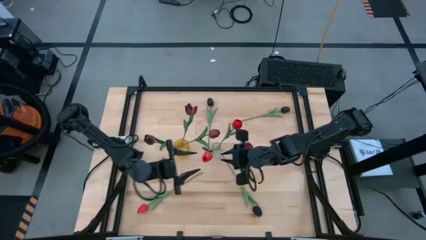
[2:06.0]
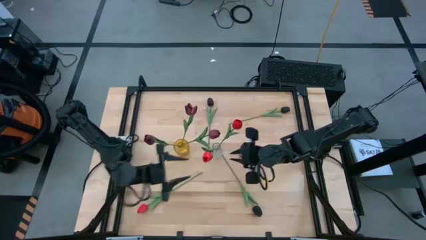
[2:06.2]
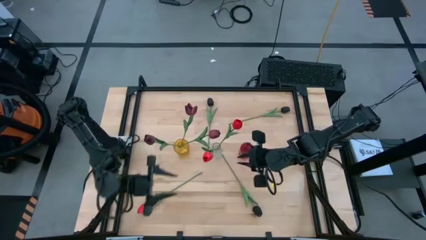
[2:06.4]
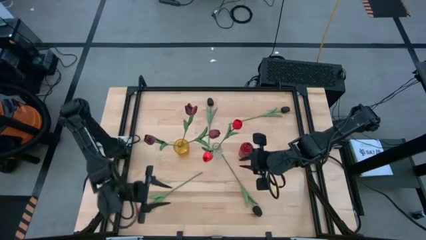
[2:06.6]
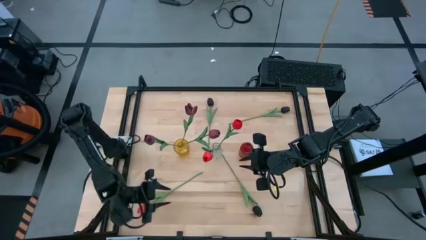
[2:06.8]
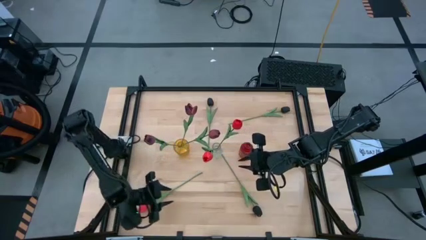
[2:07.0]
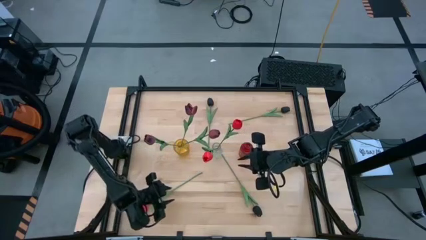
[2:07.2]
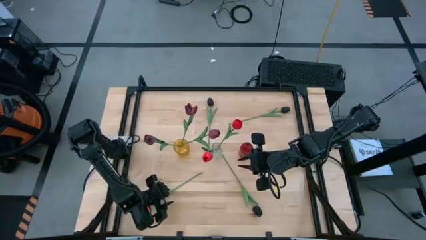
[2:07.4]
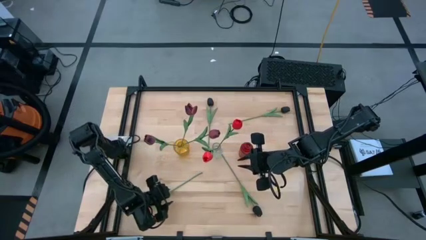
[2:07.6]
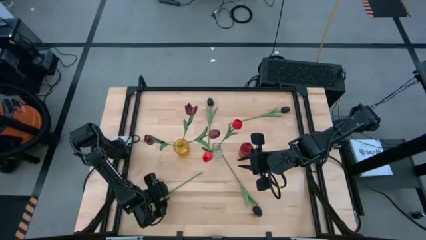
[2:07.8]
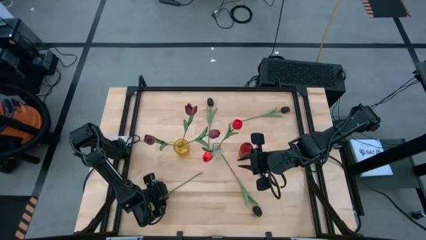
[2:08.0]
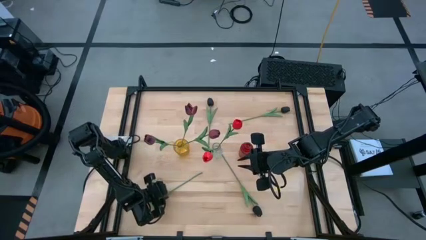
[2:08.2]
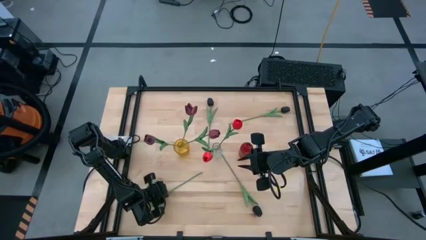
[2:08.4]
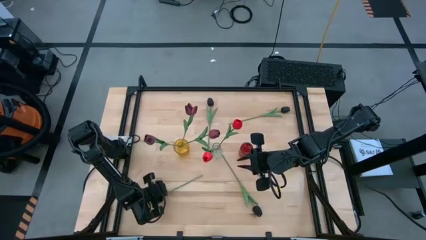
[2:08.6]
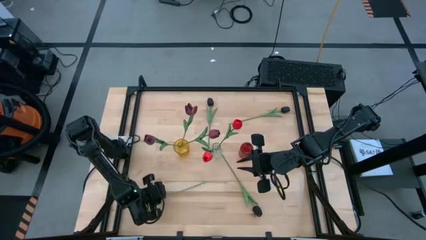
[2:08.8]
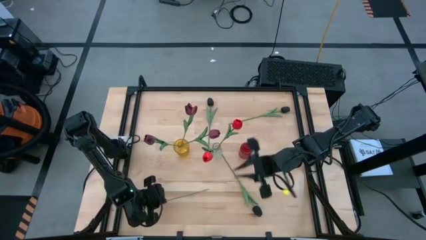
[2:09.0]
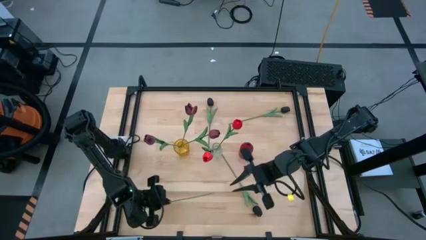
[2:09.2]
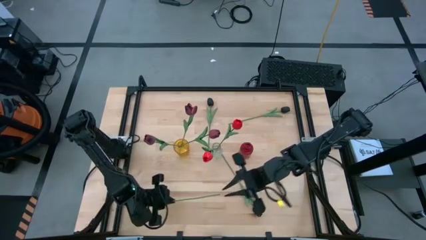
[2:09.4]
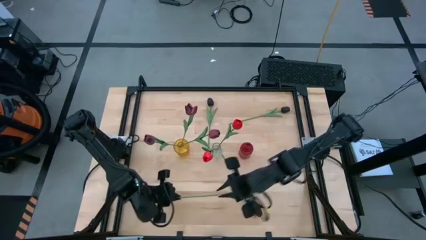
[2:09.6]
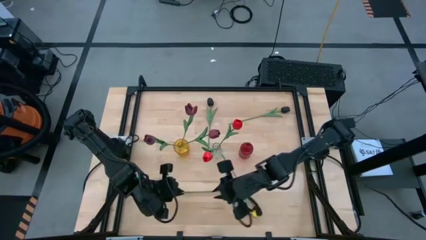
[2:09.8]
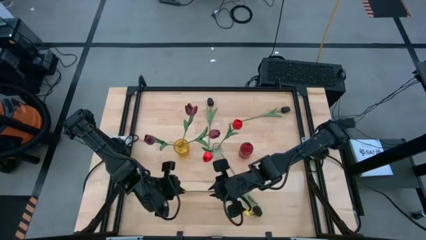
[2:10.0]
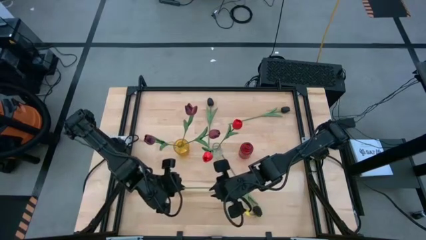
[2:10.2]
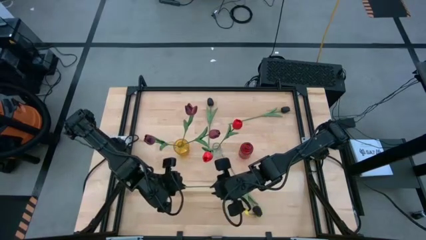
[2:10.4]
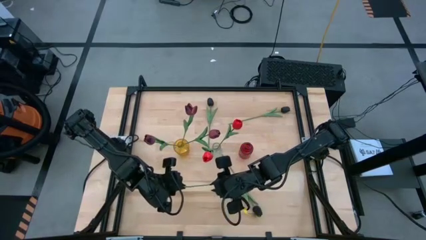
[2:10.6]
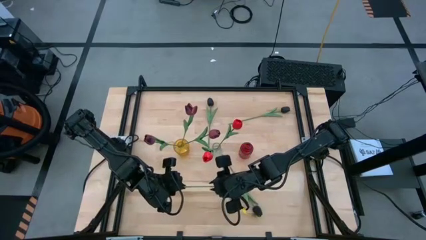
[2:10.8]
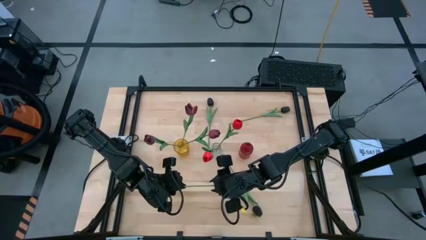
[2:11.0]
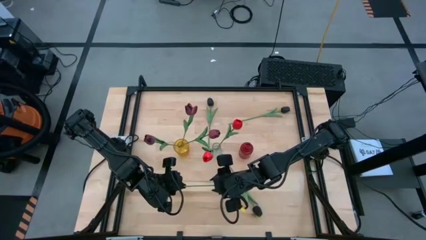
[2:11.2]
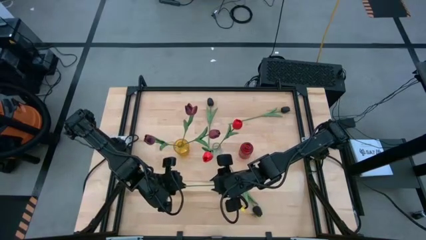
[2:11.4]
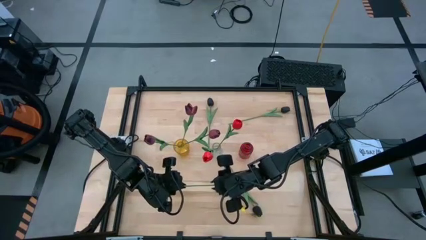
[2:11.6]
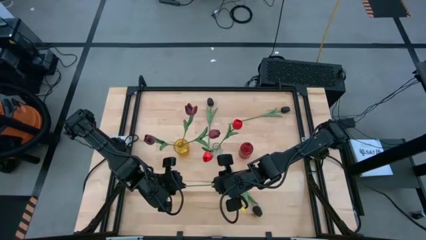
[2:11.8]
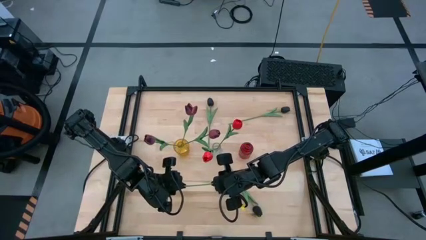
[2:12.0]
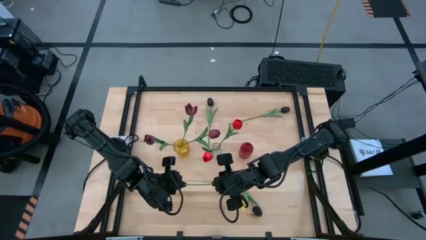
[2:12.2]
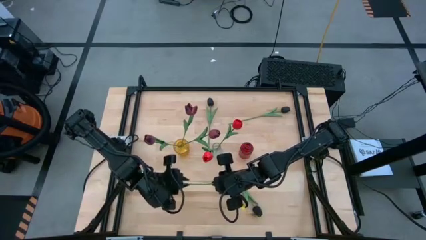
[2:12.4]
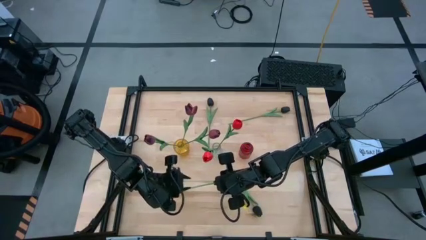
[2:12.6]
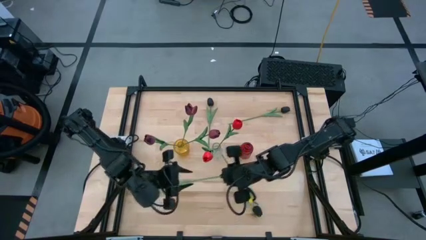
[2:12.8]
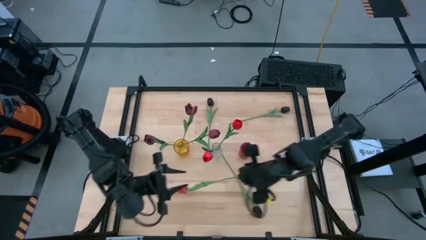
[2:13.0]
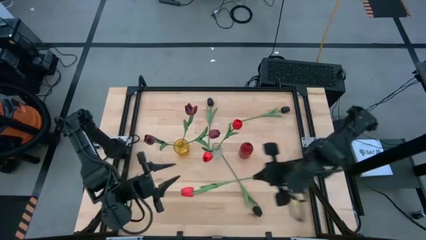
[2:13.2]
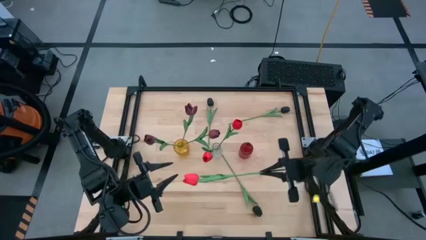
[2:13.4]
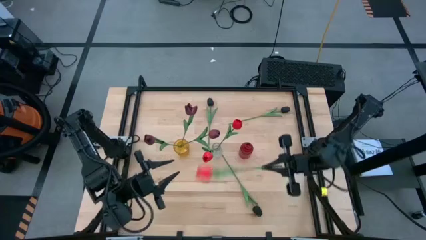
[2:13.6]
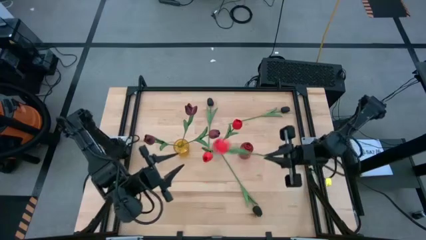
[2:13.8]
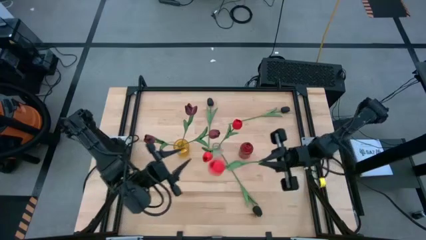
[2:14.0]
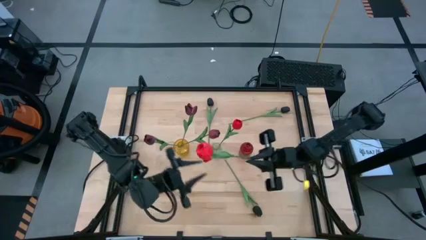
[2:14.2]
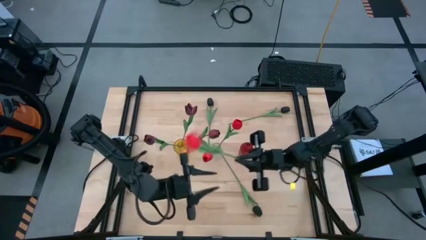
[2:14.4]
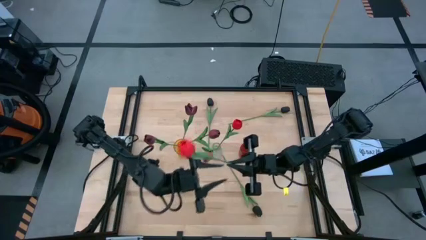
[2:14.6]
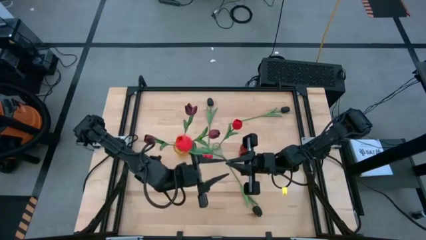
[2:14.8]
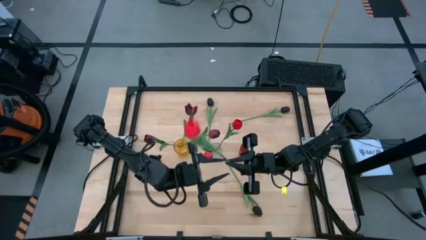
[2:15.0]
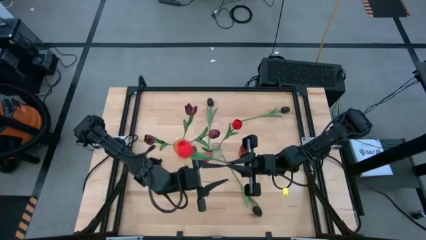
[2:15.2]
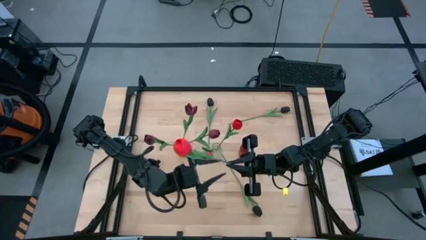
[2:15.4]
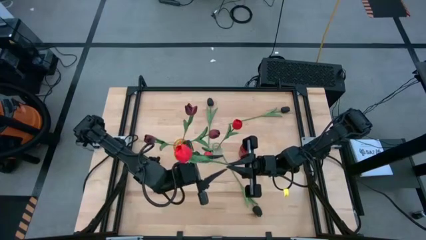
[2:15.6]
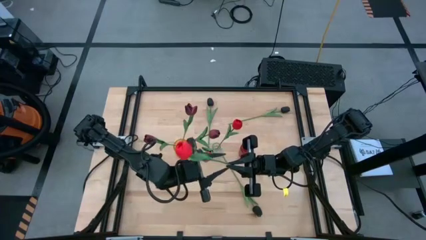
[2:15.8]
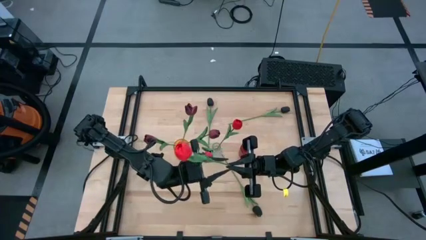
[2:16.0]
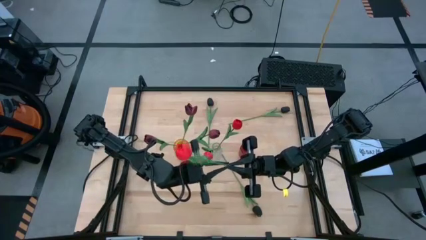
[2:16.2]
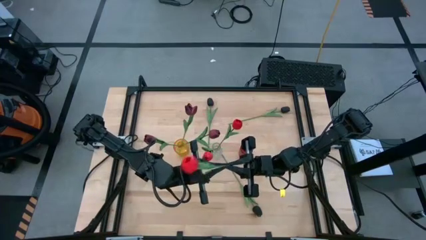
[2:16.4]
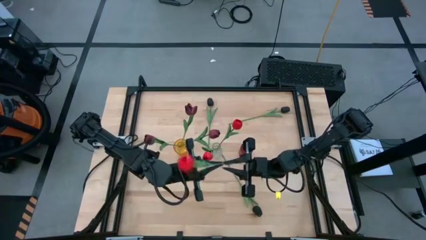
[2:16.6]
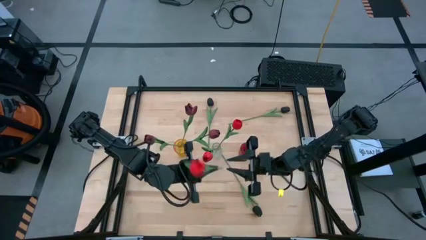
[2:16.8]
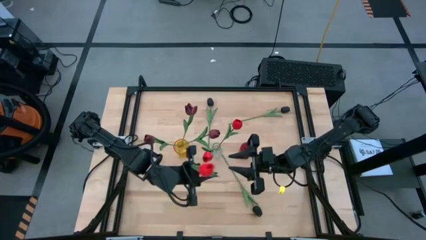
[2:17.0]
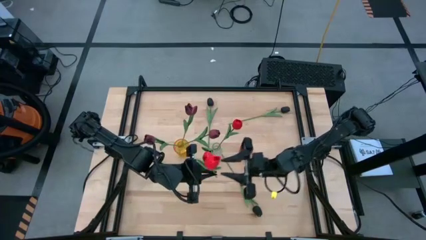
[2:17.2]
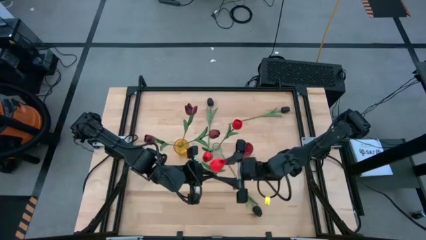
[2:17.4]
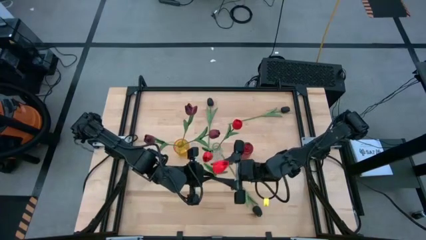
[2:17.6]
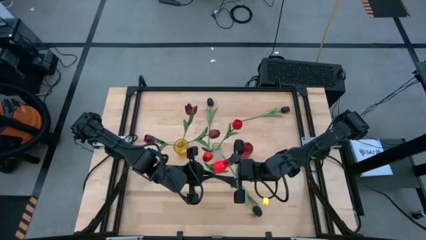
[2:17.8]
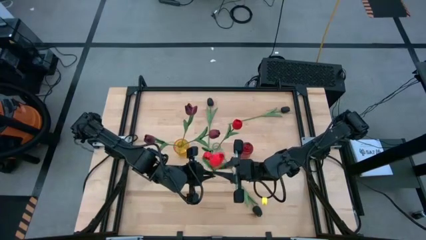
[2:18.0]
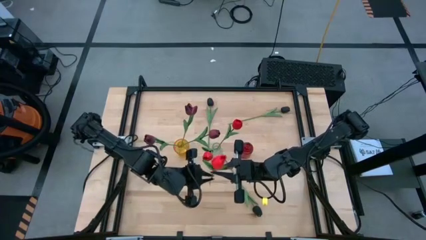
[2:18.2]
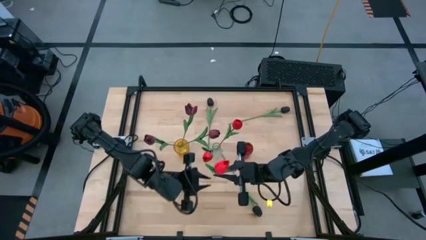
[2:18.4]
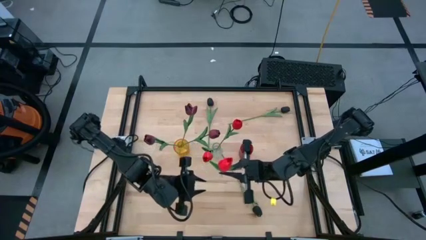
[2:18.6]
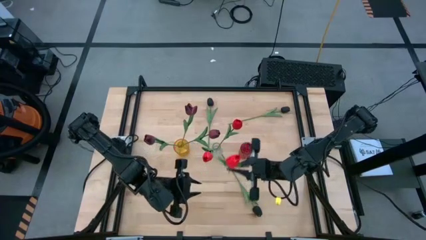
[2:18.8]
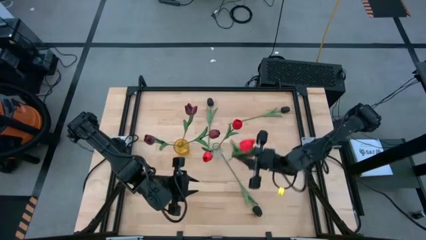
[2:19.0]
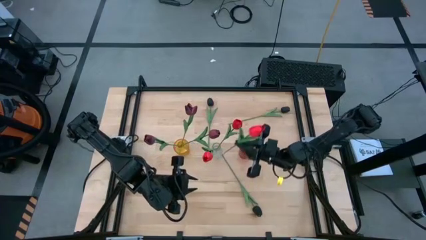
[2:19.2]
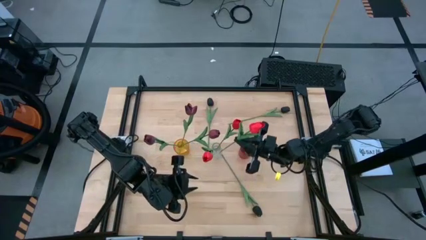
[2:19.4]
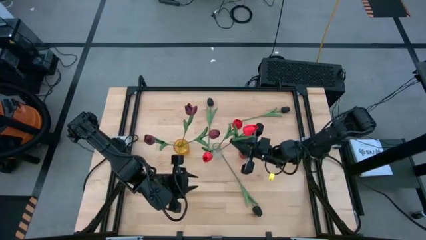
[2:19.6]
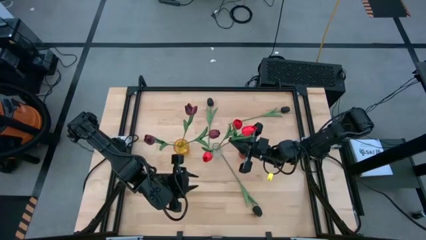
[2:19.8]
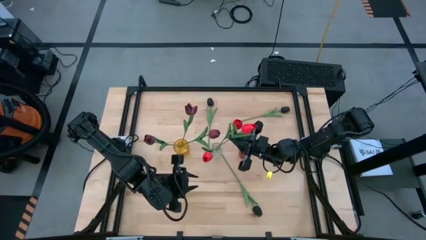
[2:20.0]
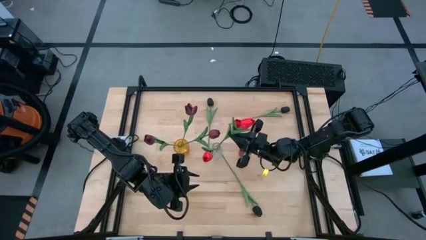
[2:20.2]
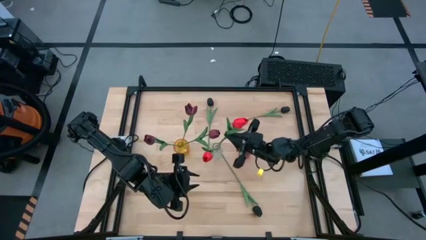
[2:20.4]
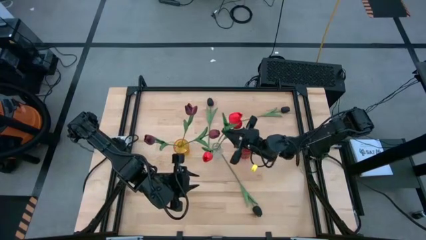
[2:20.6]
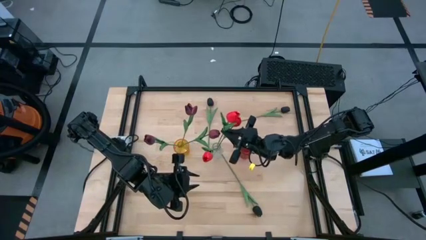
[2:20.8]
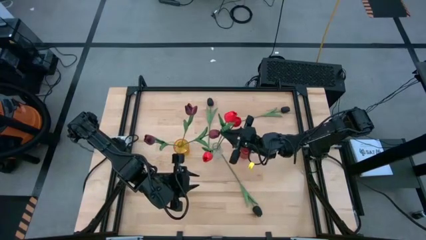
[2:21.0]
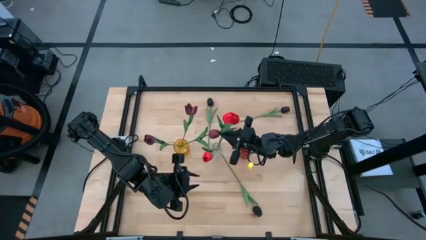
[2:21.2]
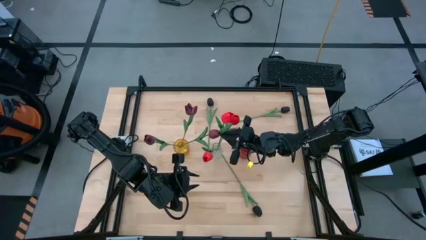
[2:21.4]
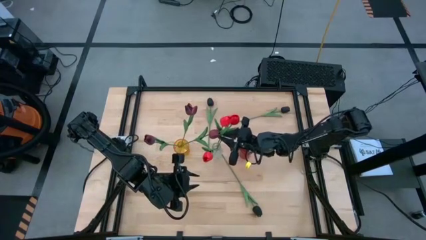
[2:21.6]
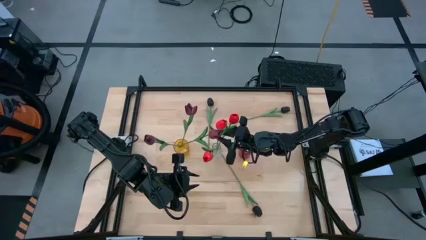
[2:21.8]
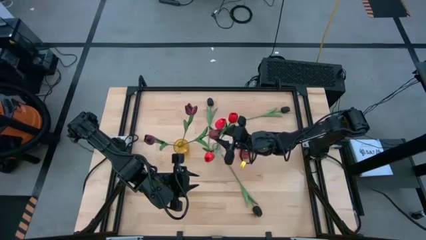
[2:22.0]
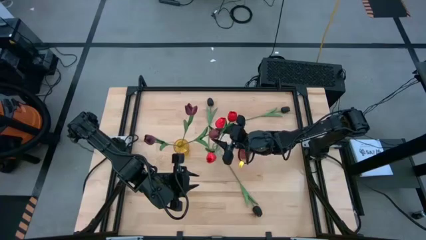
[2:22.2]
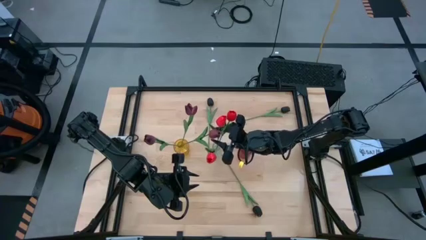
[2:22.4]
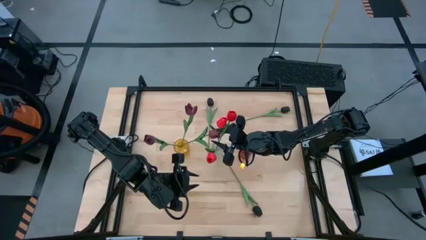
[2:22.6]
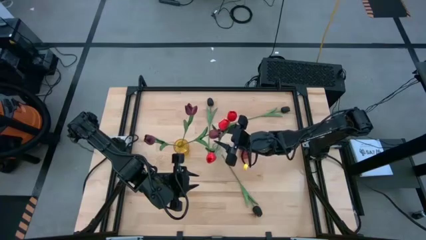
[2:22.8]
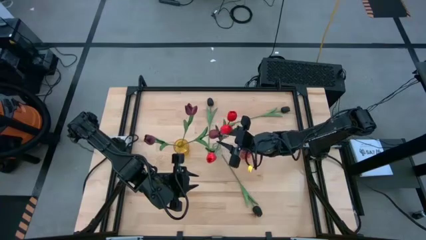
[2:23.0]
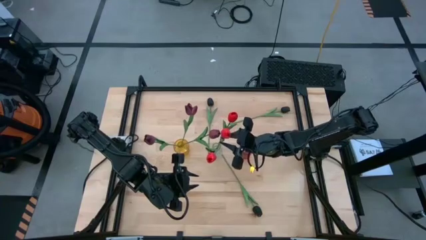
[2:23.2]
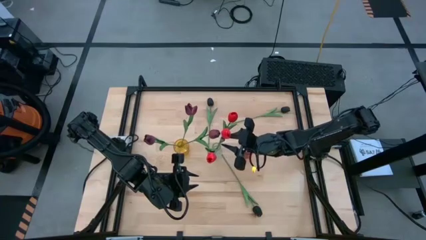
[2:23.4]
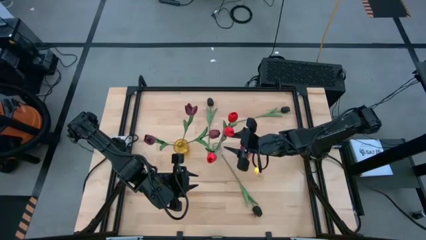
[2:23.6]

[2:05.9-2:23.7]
Task: Sort flowers into vase by color
Put the pink tulip into the transparent vase
